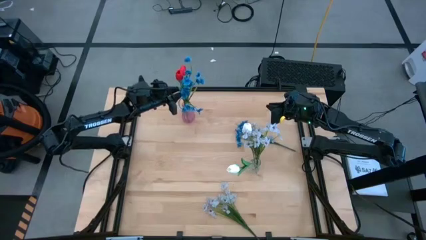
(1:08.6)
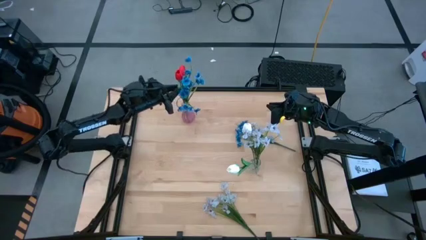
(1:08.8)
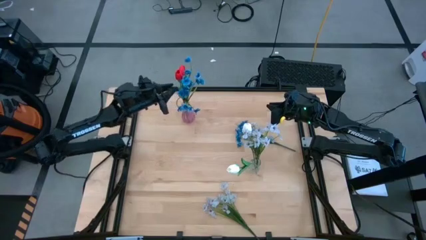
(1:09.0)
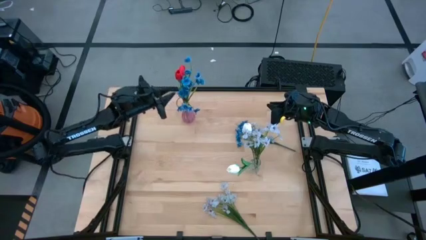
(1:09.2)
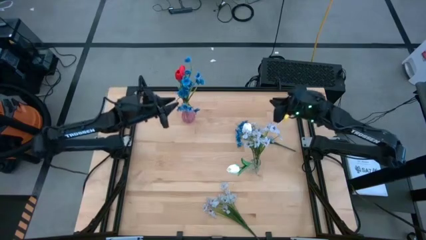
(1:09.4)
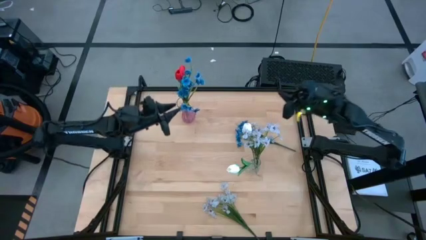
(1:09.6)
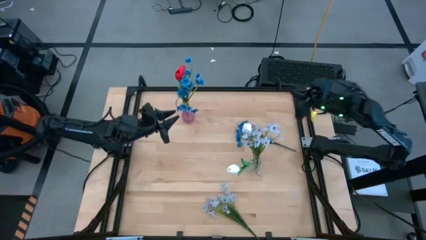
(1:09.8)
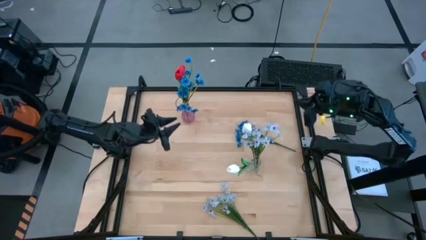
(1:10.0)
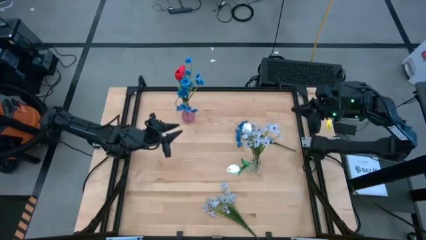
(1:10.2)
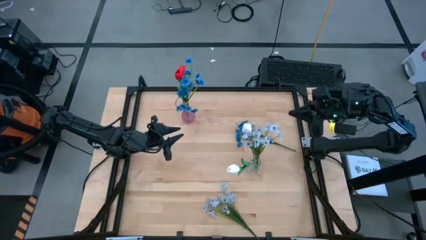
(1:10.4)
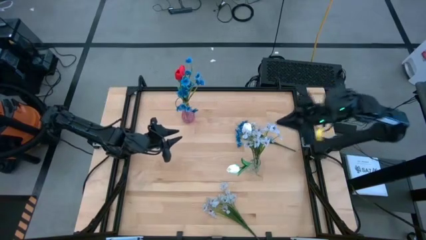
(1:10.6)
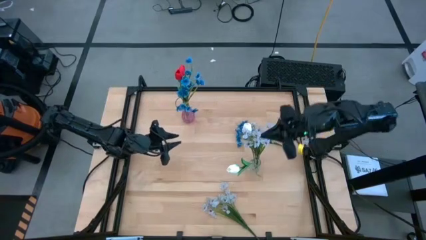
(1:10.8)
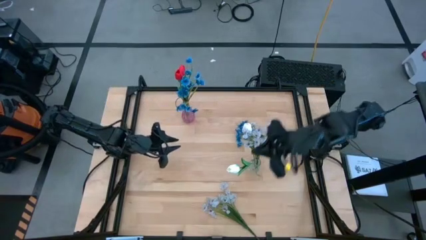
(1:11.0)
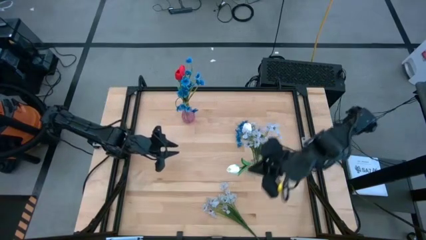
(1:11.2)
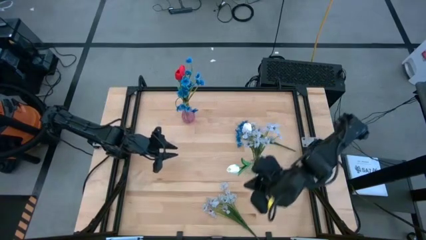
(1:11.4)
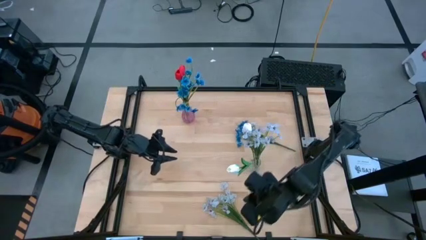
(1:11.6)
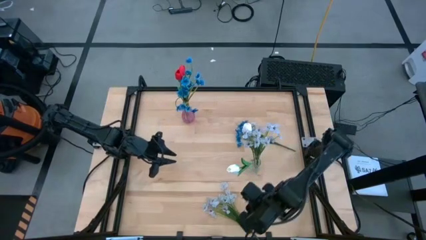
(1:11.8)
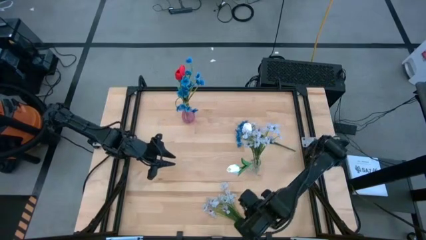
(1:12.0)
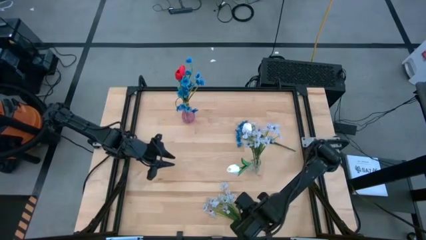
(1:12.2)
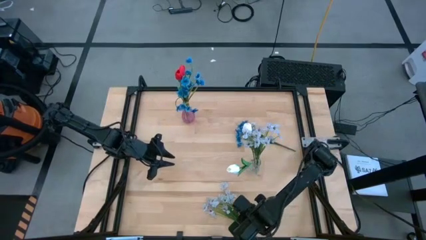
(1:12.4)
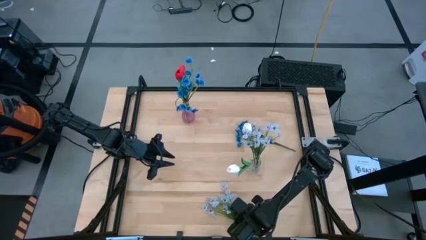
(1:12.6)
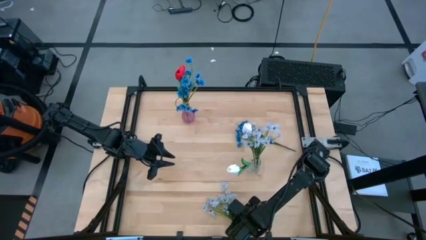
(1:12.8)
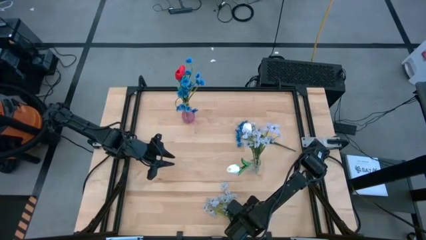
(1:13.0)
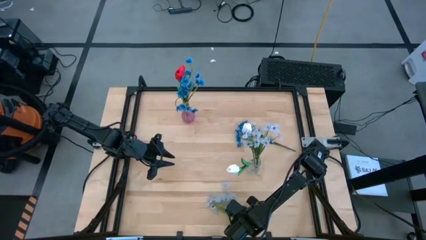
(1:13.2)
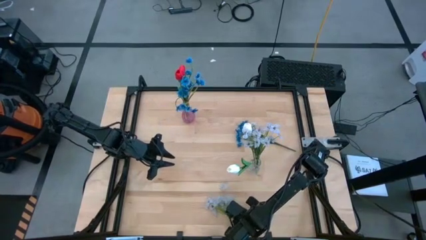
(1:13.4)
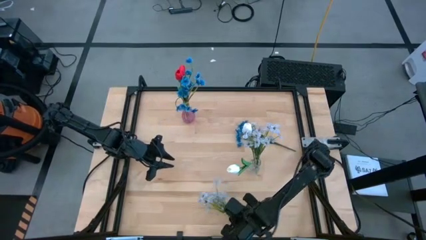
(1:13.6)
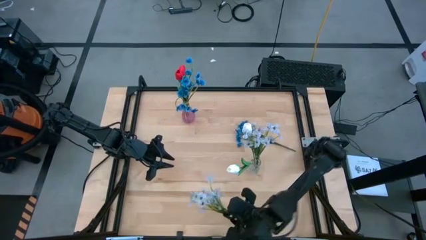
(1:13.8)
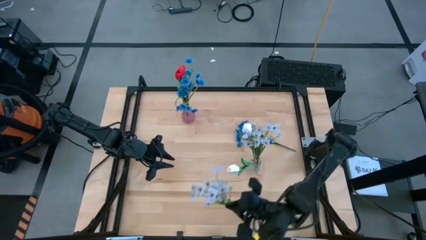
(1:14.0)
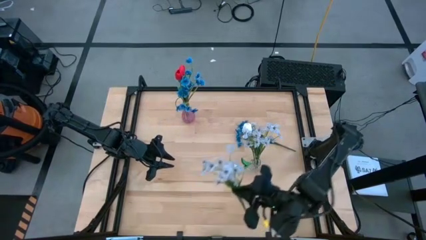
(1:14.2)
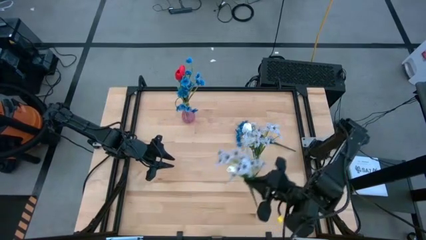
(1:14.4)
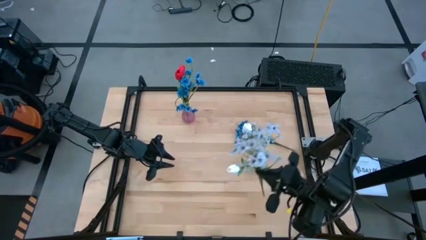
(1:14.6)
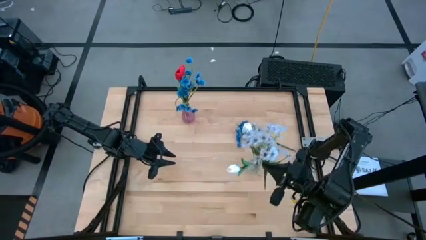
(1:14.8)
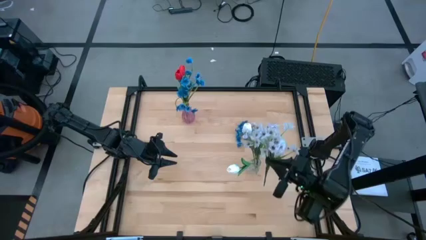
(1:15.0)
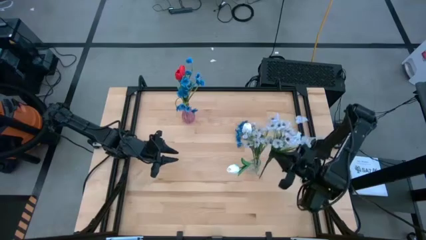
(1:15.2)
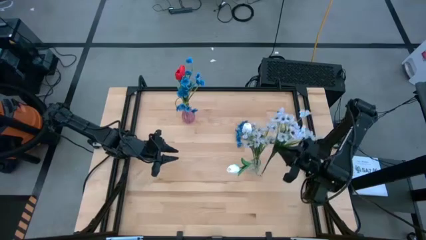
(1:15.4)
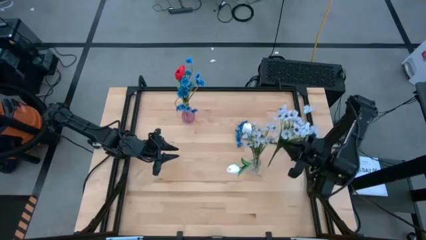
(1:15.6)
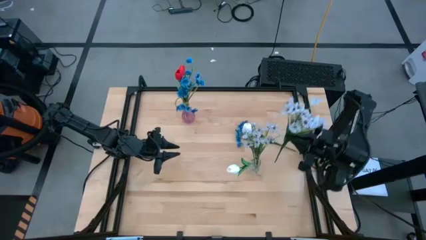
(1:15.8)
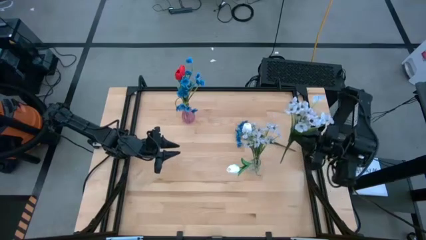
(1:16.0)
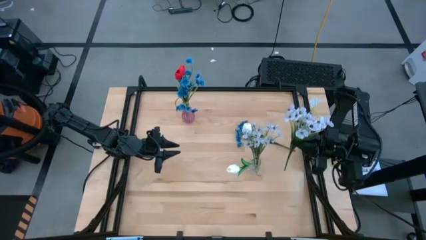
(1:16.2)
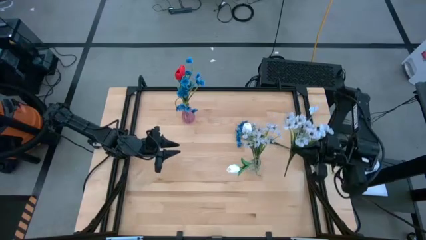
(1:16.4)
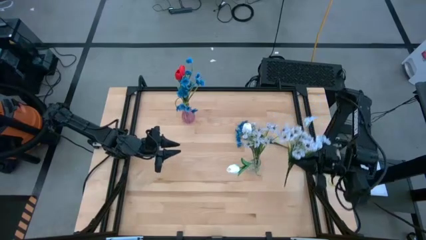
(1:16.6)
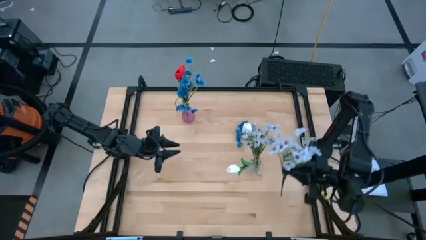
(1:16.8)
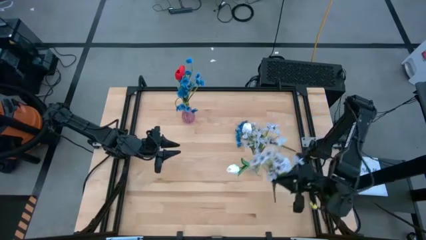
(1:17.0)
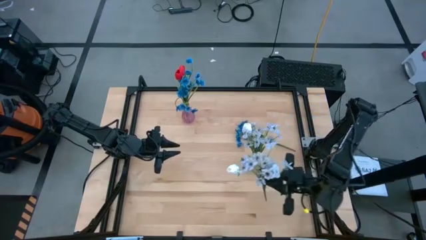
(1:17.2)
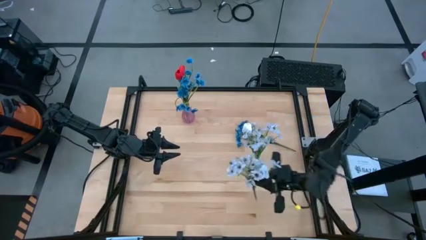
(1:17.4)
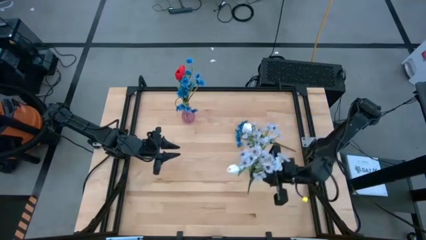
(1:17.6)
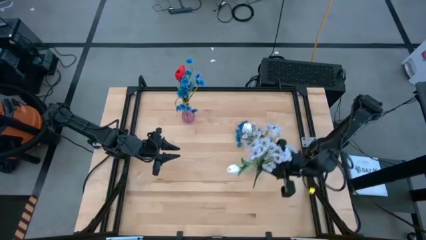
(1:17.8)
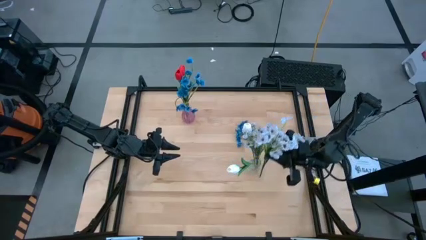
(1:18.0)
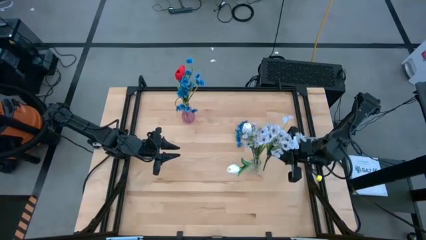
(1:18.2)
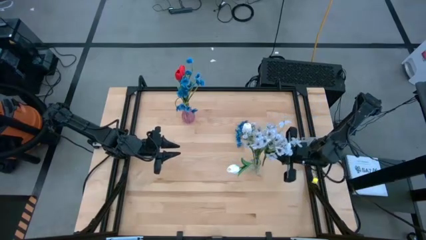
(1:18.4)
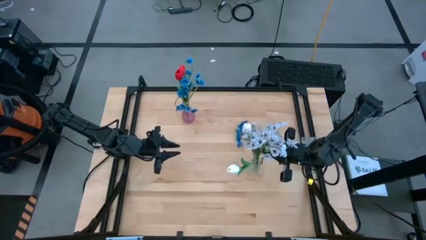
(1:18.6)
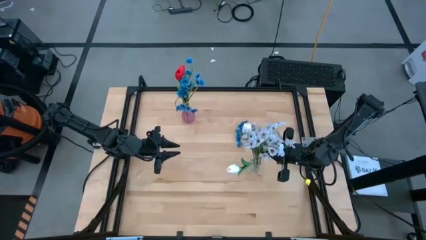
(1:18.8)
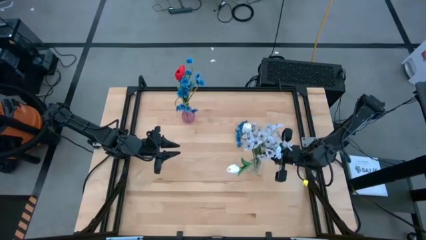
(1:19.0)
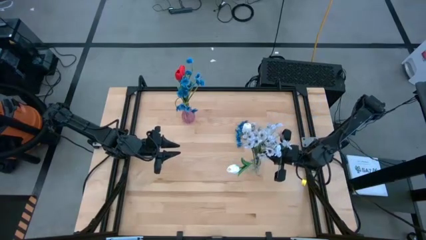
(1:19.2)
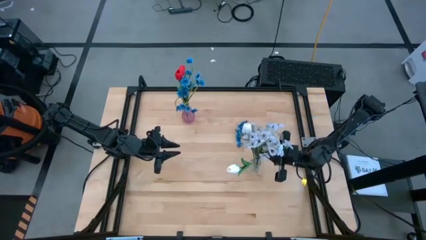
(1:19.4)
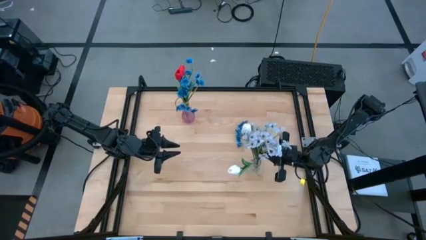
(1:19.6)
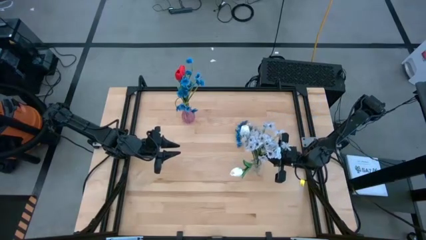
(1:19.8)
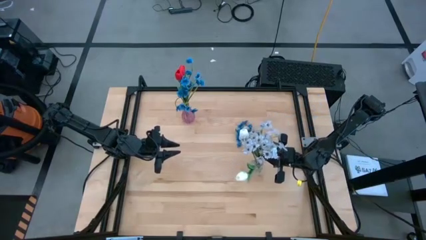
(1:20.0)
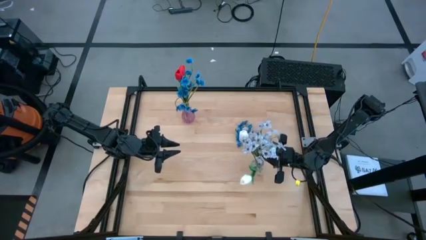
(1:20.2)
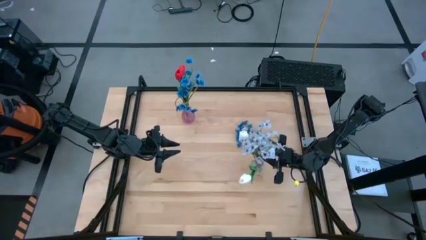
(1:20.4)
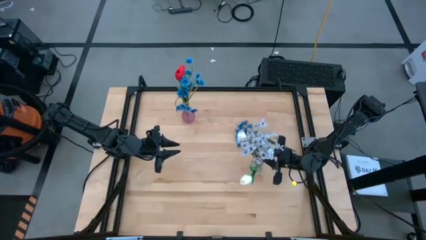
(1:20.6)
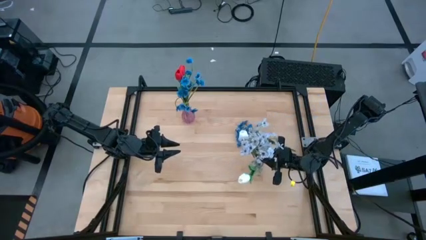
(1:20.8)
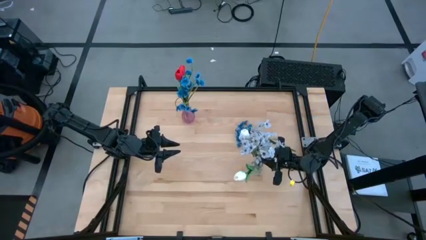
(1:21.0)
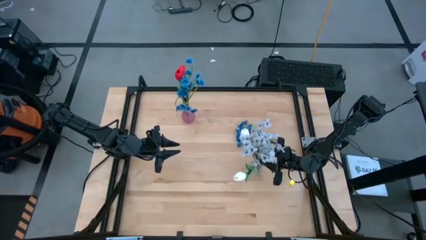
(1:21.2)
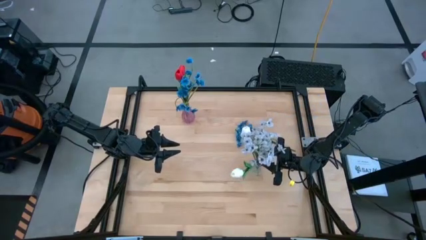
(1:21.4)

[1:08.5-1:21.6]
Task: Sort flowers into vase by color
Put the white flowers into the transparent vase
